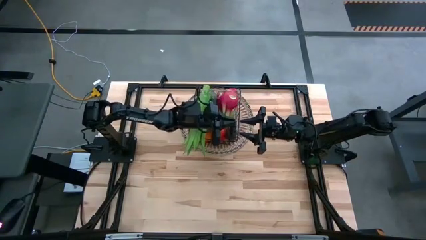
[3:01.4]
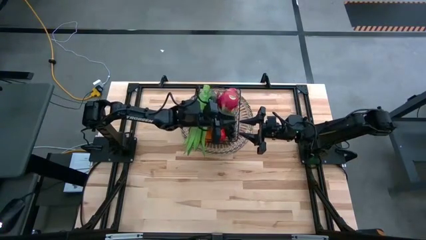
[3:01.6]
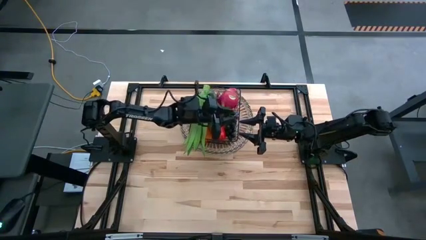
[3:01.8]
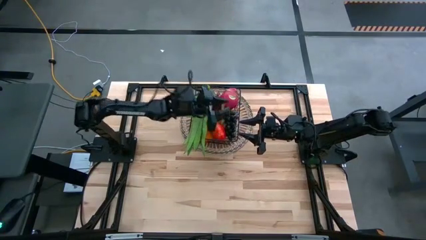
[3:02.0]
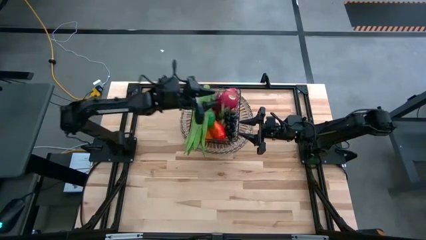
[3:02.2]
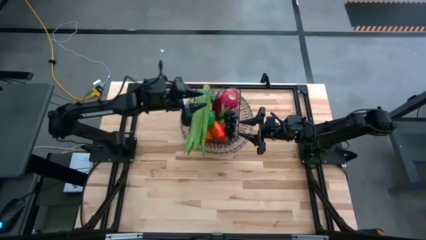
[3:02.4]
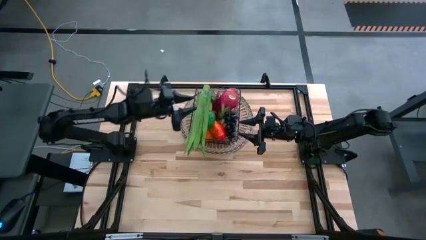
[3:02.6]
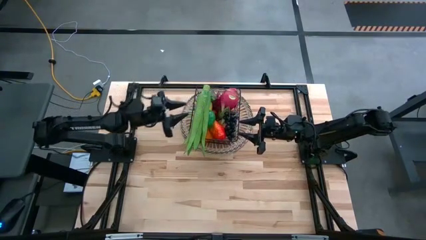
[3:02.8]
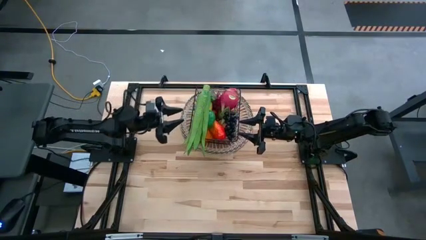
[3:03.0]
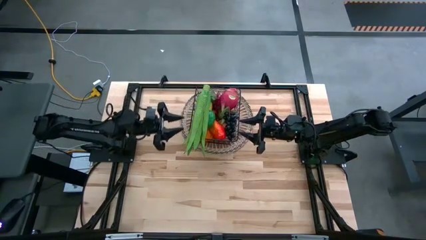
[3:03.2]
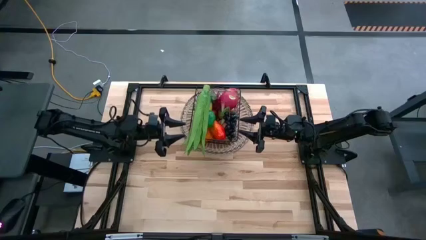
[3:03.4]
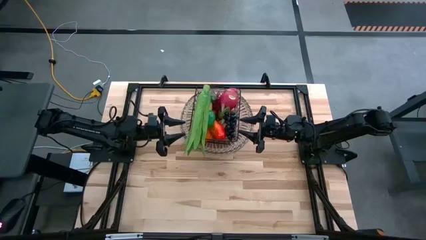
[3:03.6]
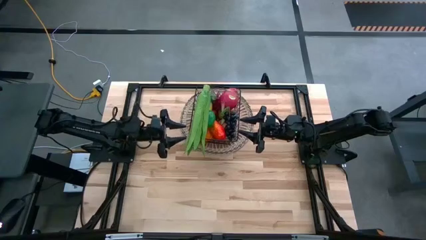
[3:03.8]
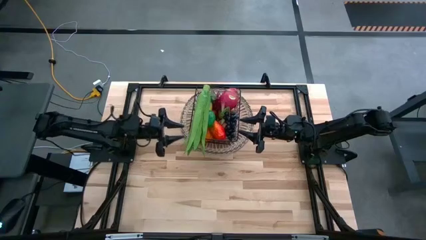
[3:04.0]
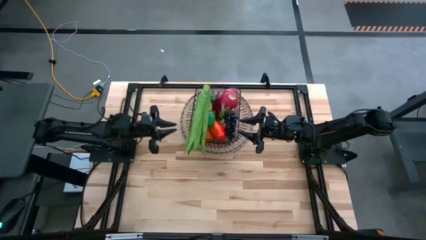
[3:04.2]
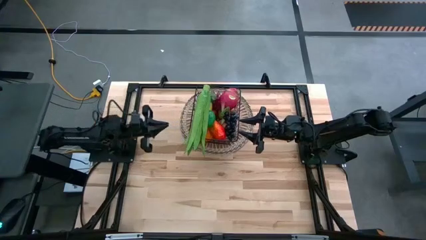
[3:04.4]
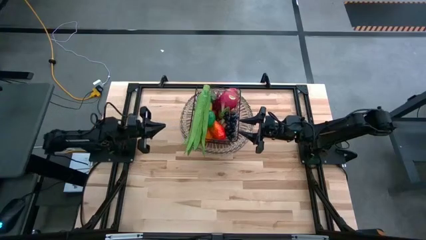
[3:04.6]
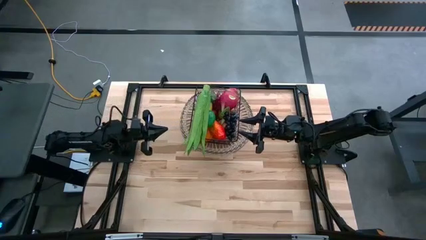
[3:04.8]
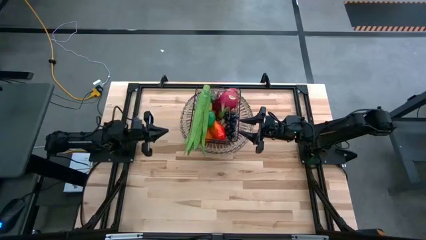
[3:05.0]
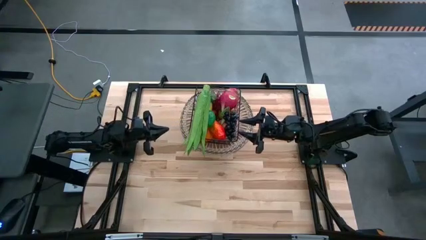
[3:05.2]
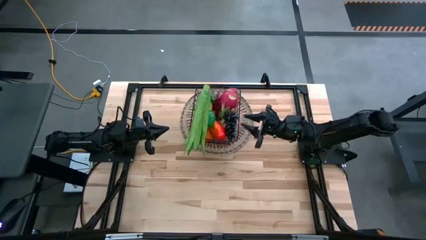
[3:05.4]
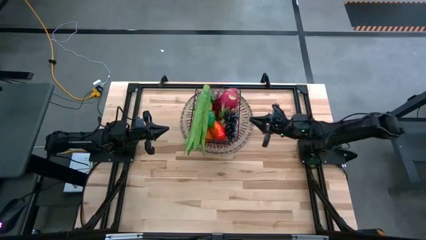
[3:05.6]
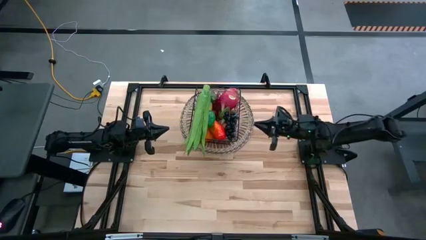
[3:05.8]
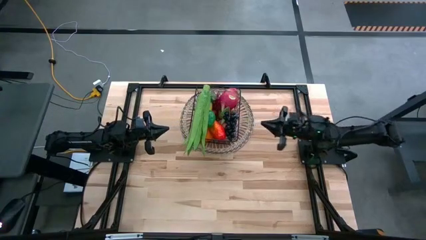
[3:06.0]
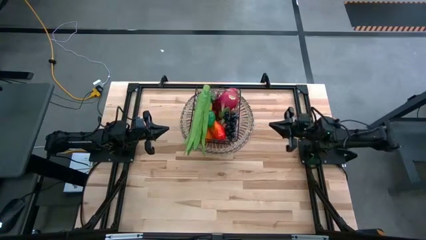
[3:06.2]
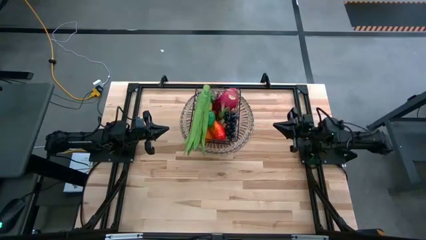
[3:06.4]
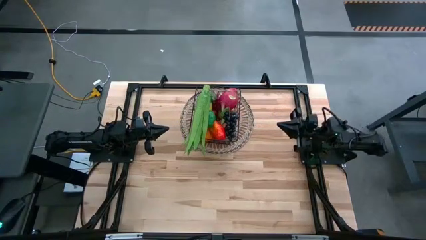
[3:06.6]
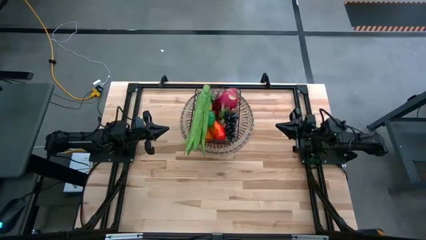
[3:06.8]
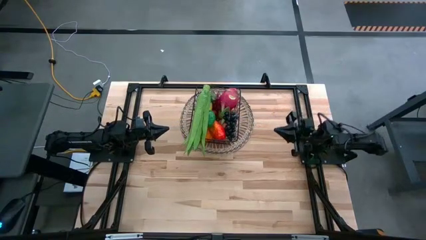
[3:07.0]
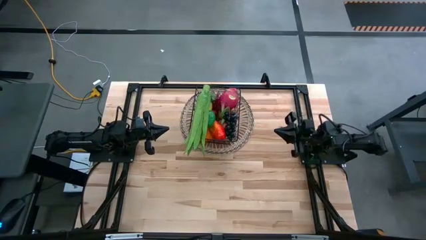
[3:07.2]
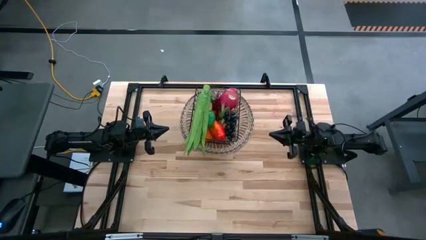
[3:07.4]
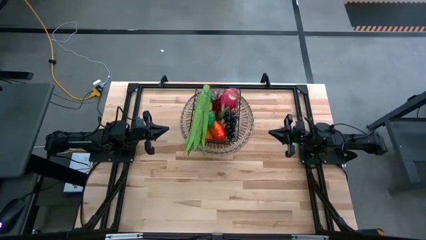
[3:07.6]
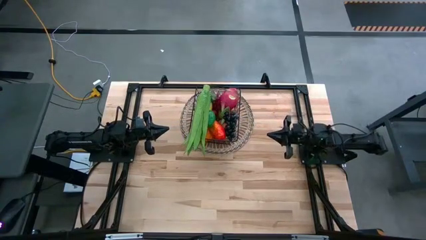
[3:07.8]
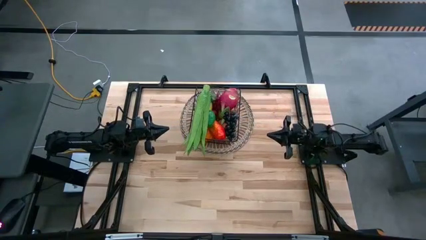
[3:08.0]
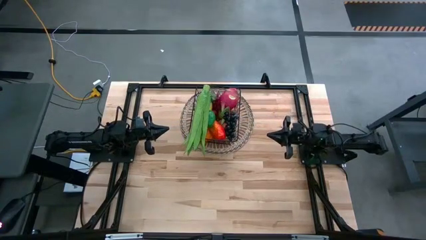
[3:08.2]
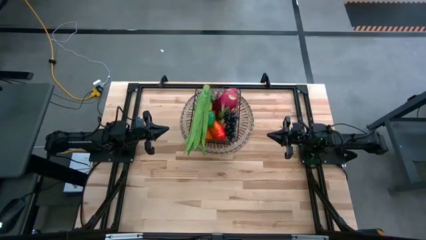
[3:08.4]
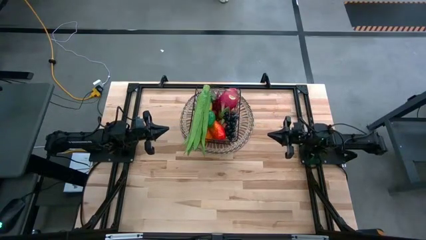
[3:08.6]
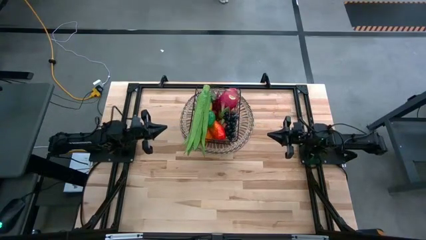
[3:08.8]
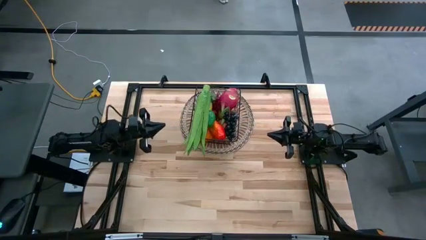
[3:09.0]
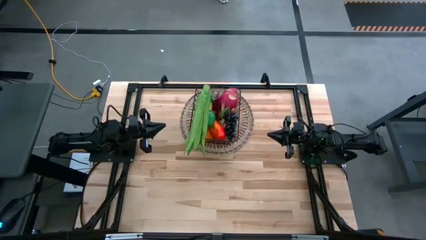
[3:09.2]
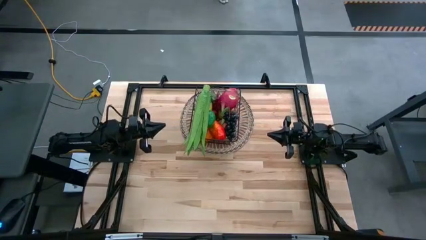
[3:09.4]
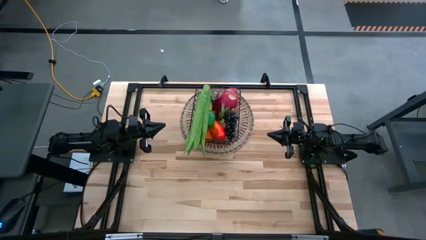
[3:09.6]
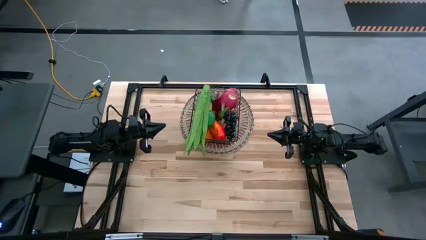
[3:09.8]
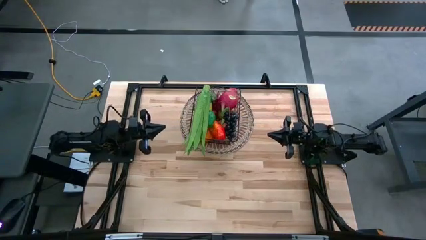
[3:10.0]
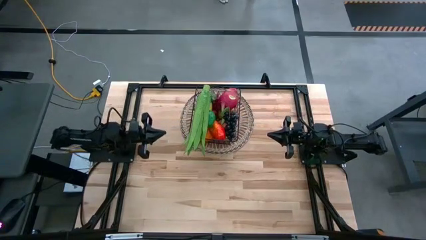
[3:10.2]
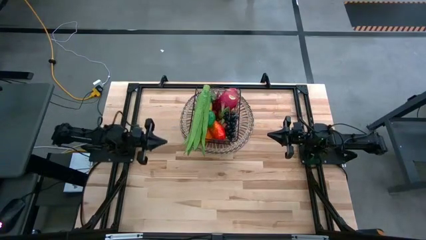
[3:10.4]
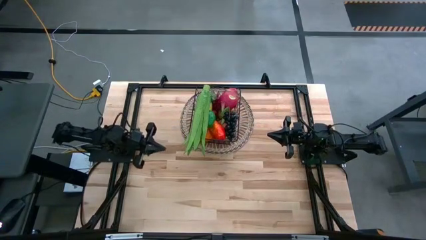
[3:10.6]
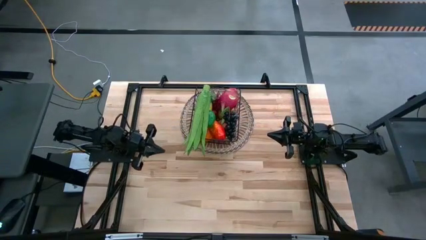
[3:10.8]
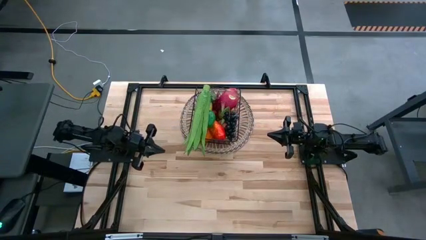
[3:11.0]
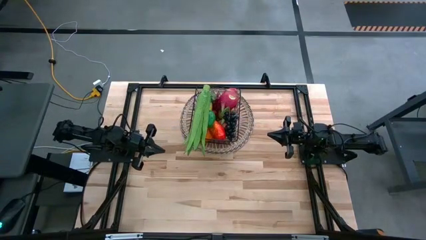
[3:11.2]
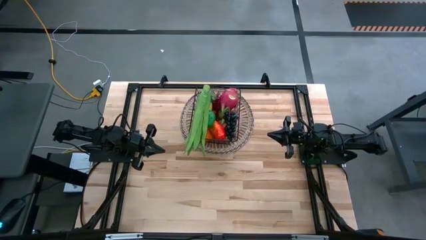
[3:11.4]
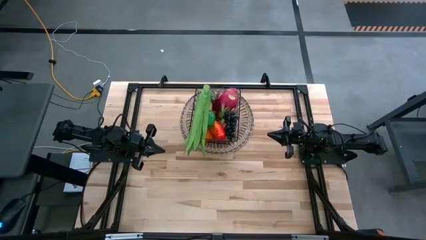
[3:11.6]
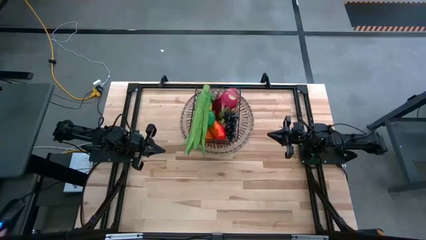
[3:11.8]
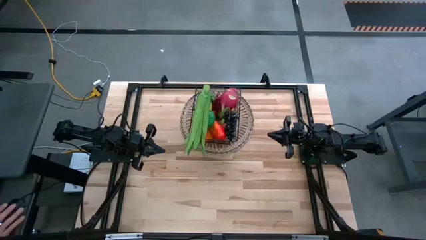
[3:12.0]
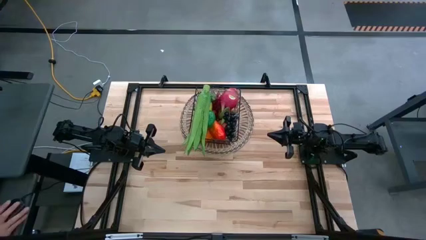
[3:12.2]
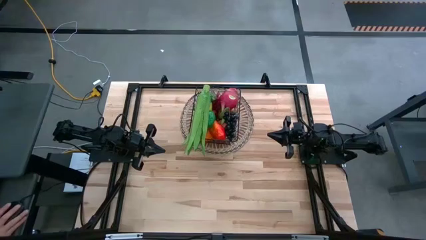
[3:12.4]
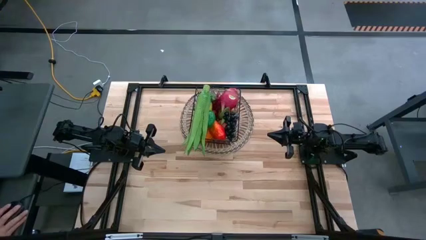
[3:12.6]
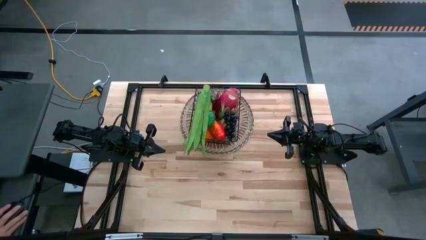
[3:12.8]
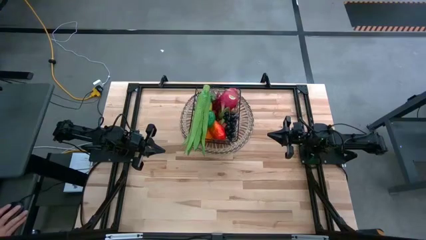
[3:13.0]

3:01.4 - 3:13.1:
Task: Build produce basket
Return to Home Position

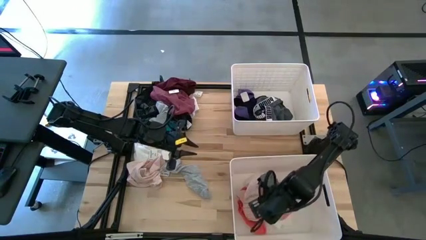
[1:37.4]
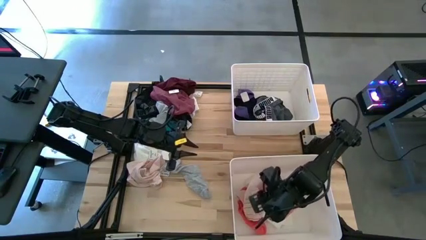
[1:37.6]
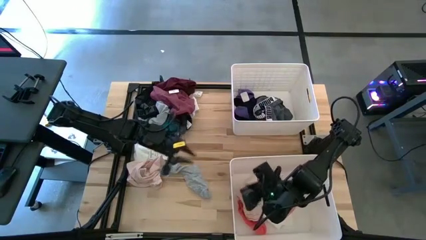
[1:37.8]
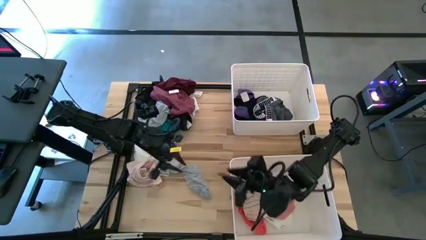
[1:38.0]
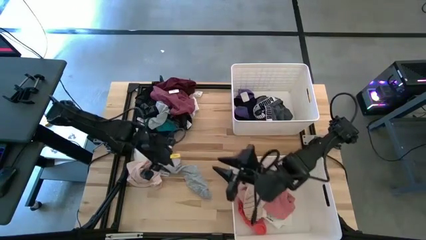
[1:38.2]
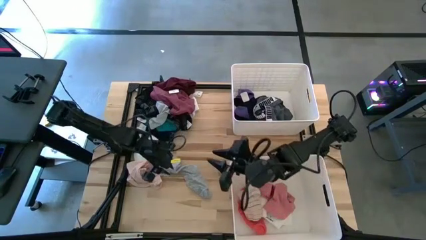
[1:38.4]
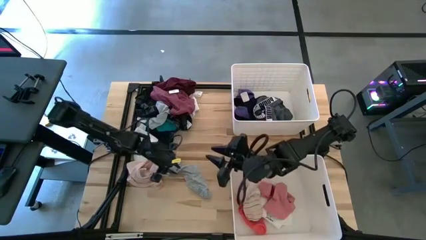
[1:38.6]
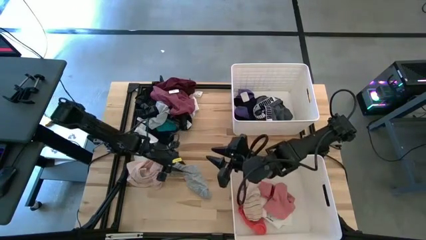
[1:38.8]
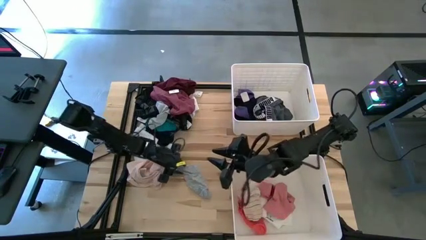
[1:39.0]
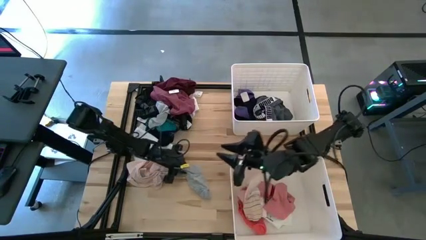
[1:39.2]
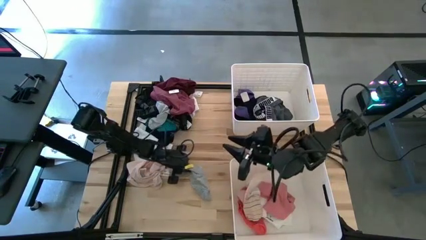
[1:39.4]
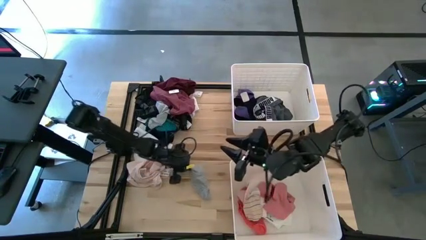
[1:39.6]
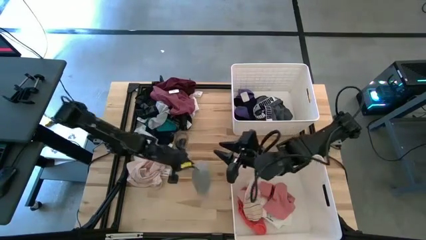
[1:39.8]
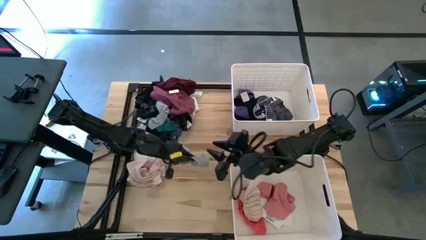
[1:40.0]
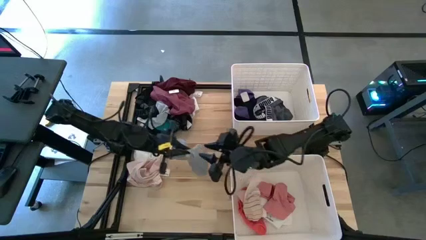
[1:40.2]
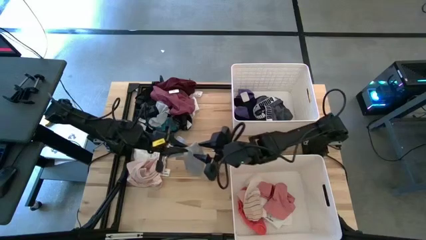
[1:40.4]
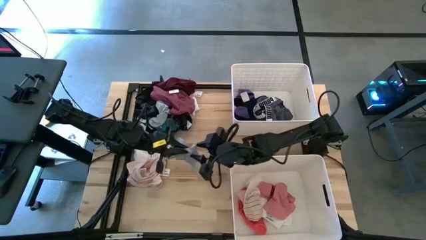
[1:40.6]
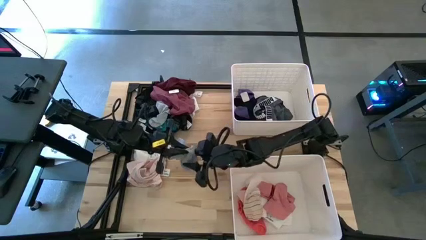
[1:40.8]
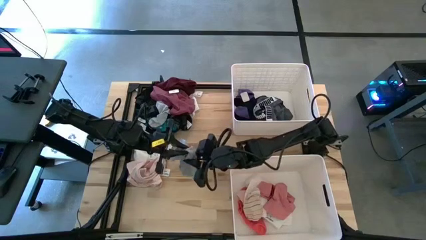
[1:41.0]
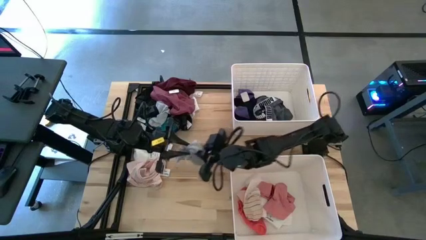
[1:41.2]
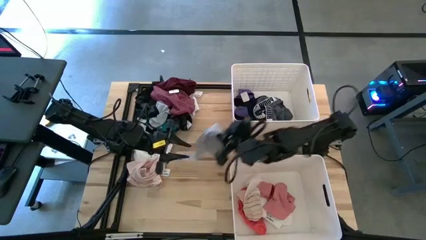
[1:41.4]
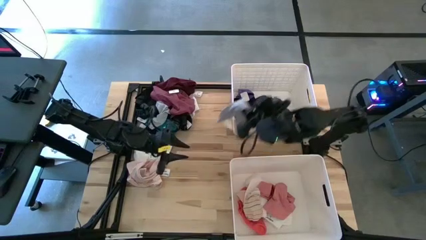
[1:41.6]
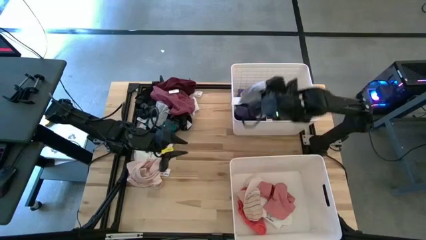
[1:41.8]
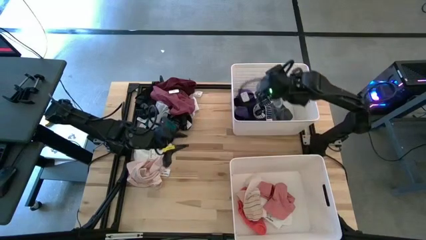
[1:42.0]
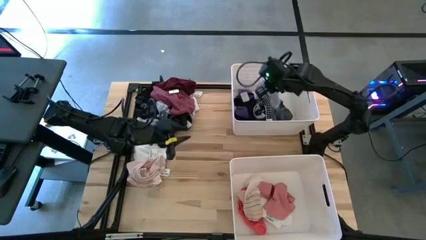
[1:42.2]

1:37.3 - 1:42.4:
Task: Sort clothes
Put the grey sock into the top bin
